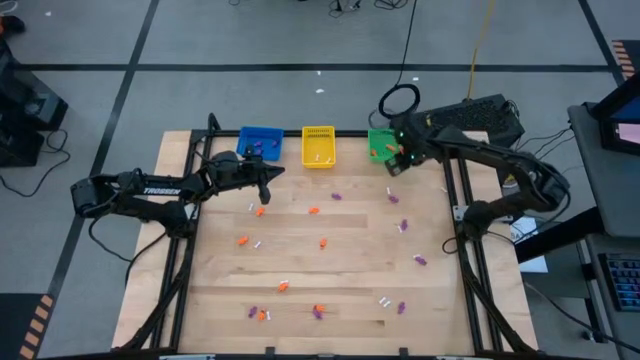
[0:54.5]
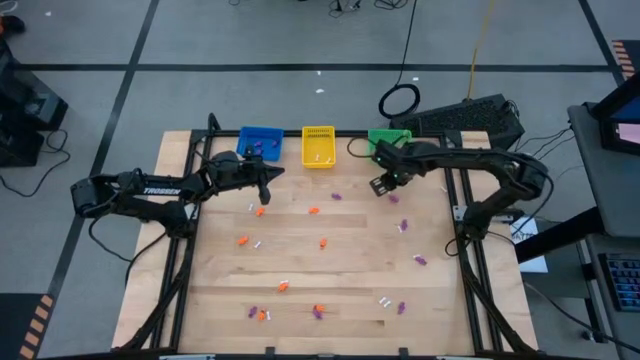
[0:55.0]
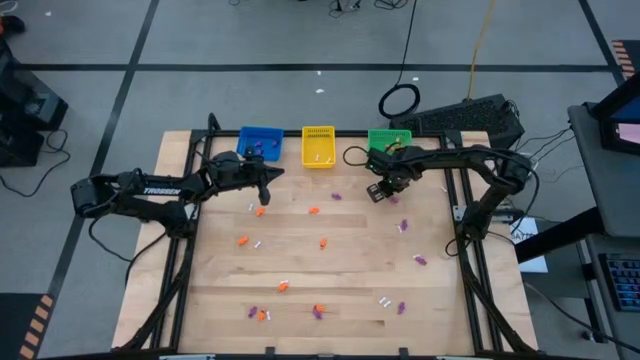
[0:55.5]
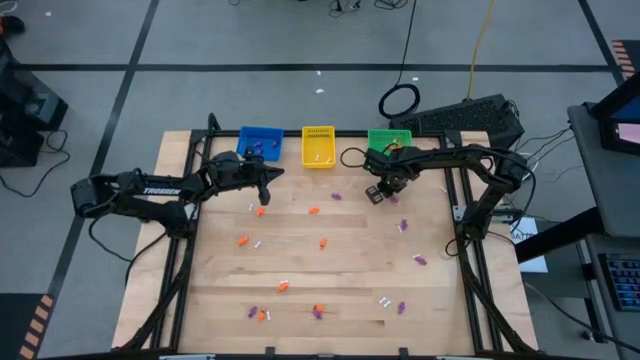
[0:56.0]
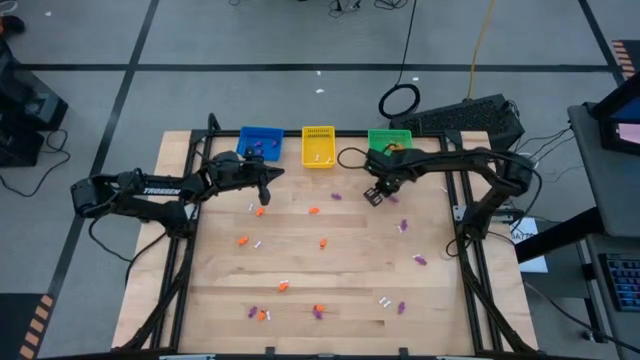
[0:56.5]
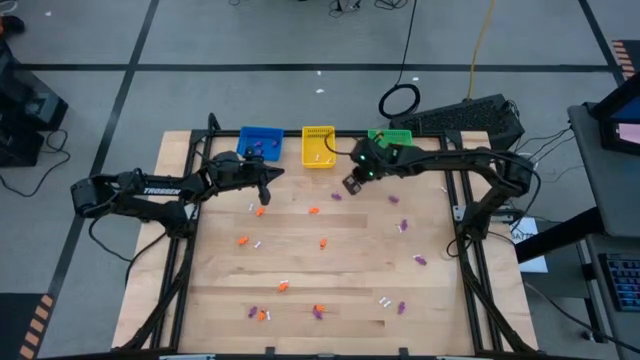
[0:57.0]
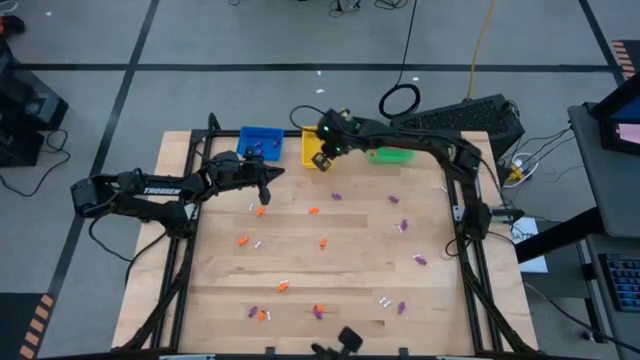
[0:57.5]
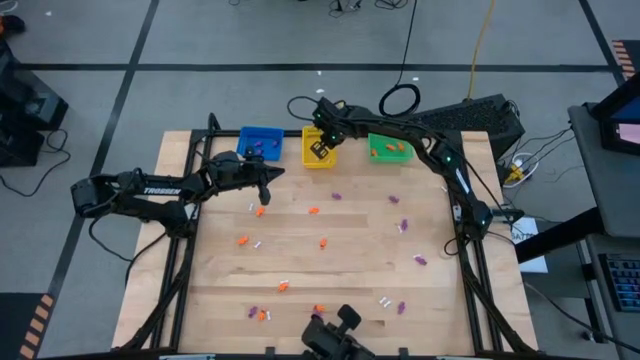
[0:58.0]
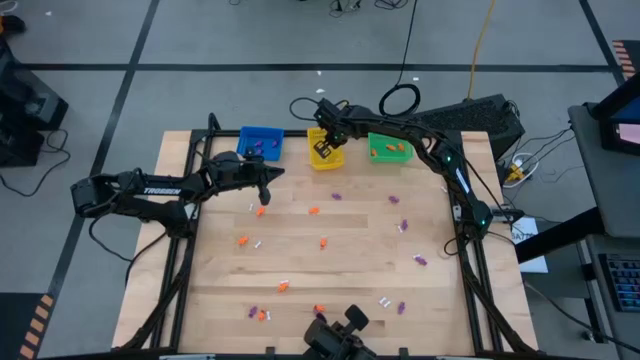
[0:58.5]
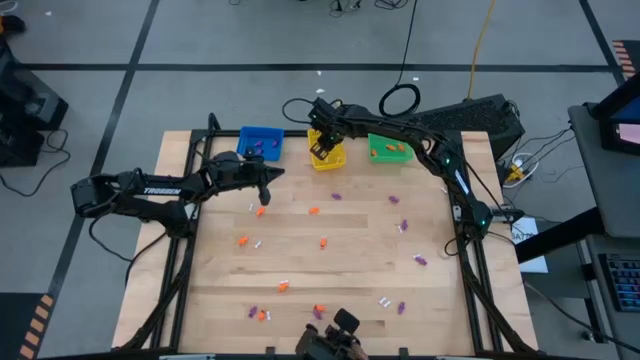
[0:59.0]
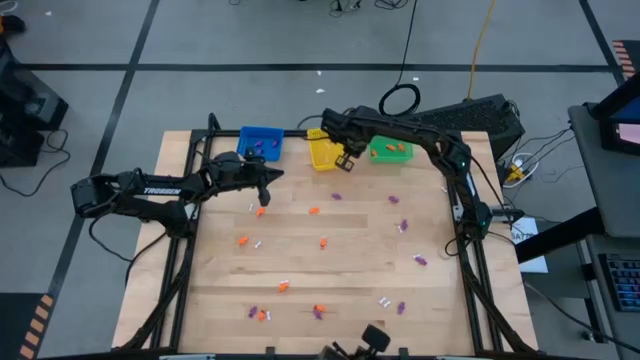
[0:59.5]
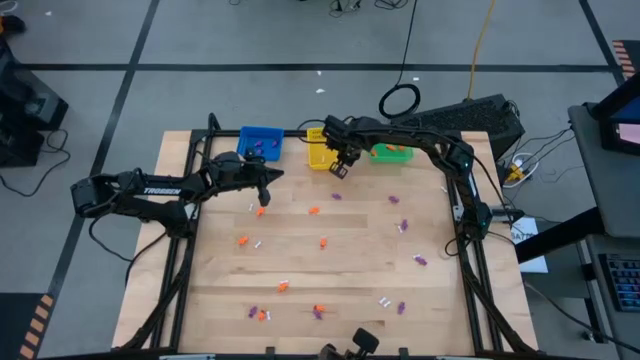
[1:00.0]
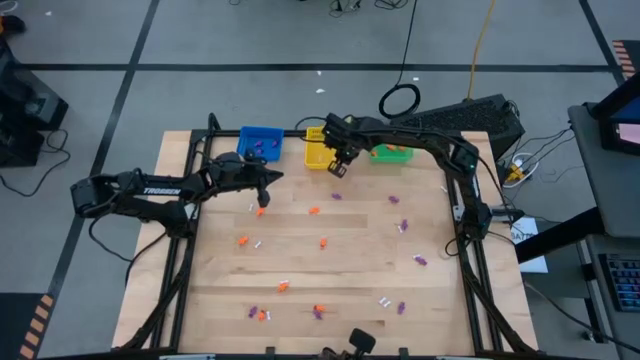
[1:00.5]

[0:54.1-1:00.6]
Task: Sort Halloween decoration
Put the white bone toy into the yellow bin

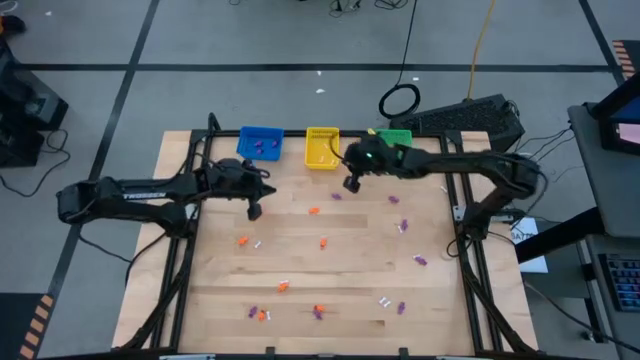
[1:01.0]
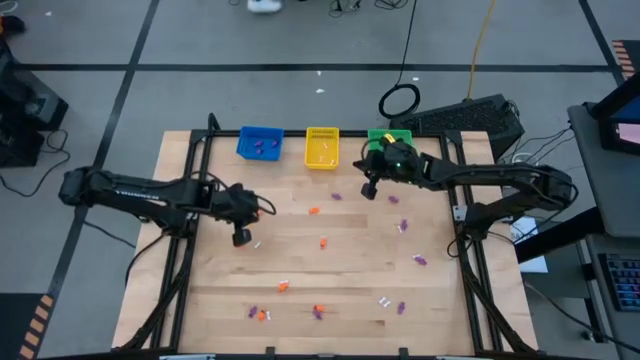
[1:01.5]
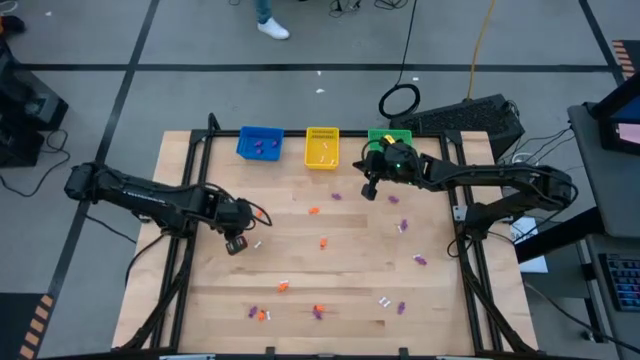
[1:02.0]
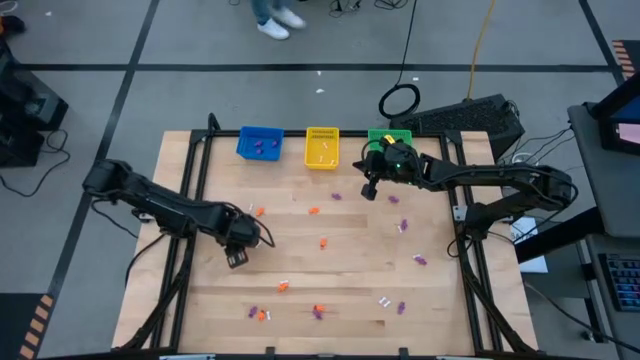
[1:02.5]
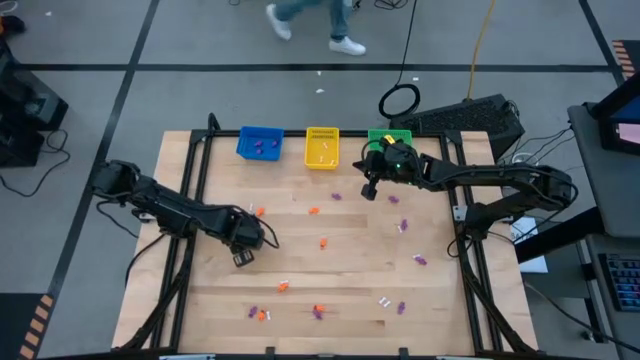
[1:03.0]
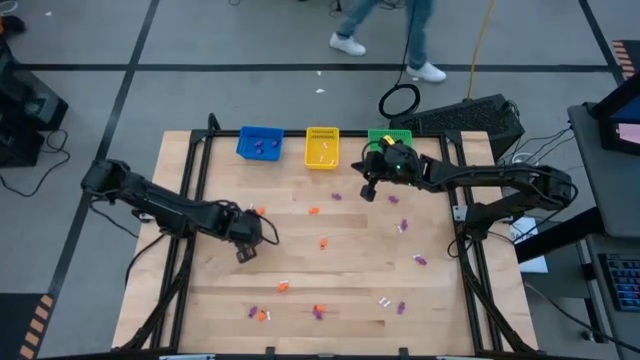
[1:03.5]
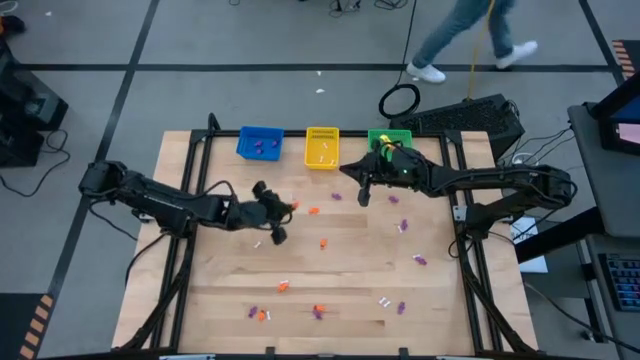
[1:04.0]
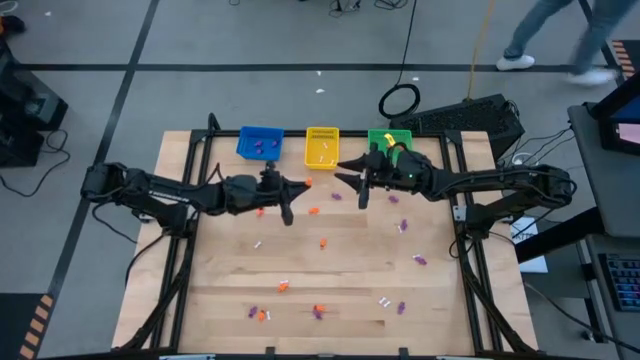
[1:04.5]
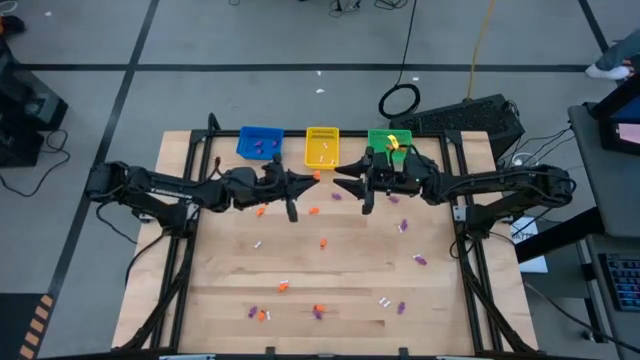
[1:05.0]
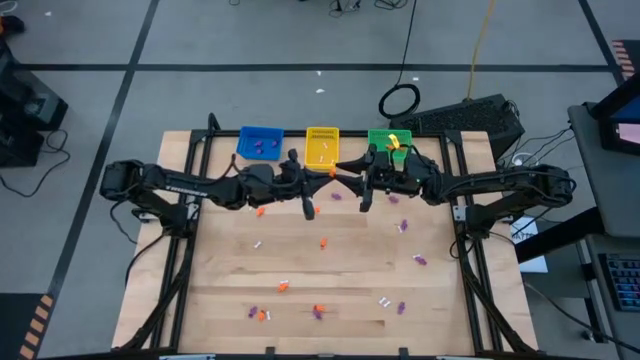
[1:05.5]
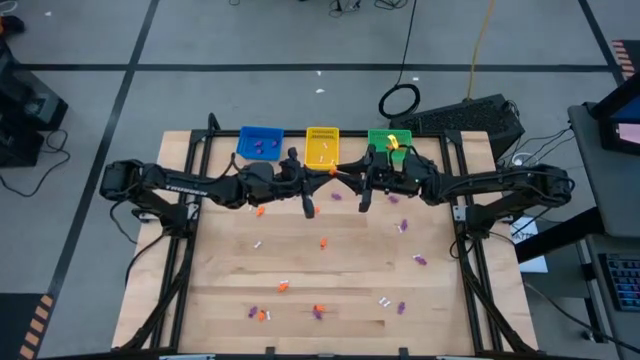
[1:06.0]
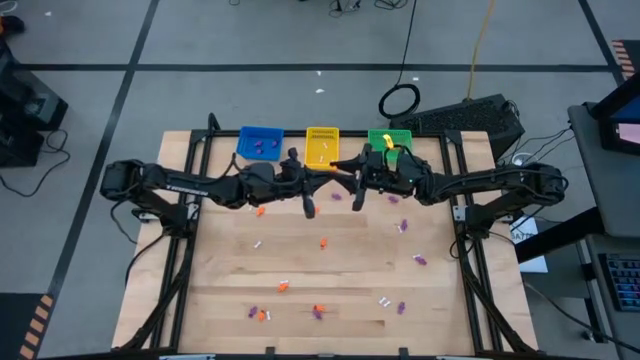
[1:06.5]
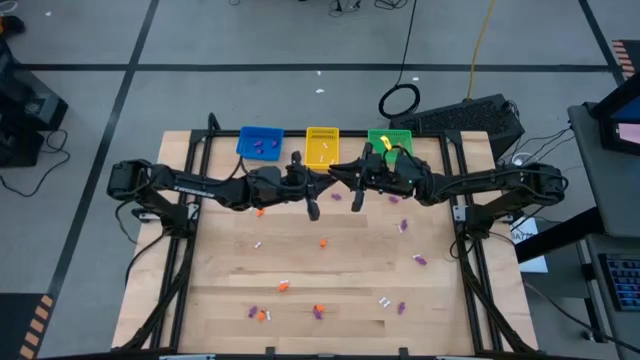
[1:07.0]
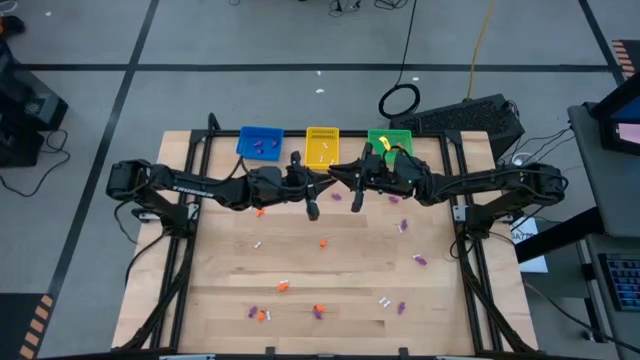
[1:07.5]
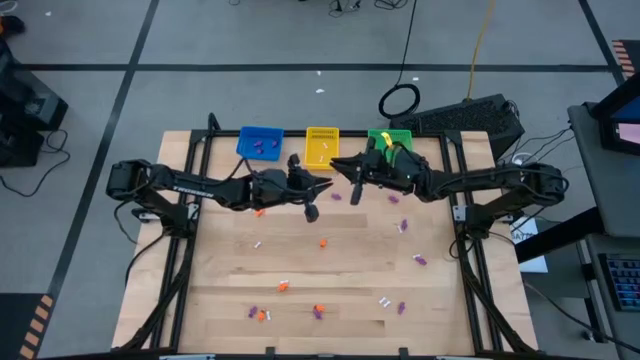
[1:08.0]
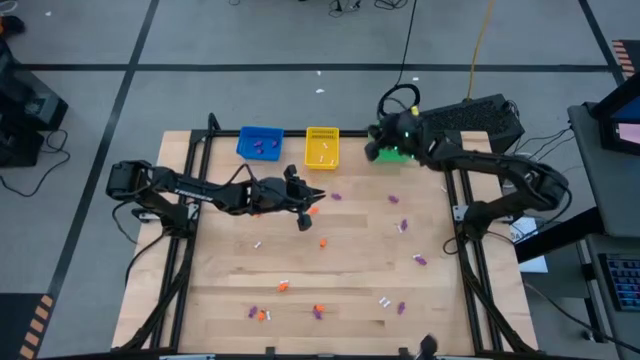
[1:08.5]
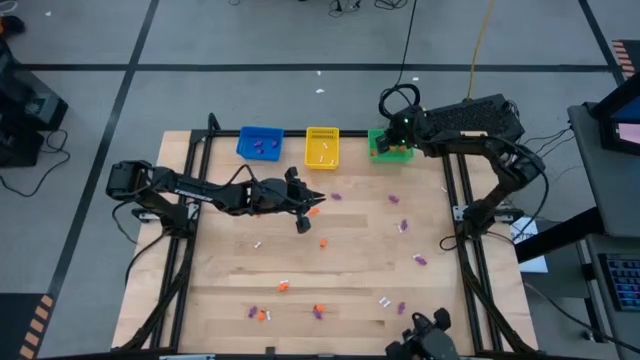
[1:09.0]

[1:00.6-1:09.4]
Put the orange skeleton toy into the green bin

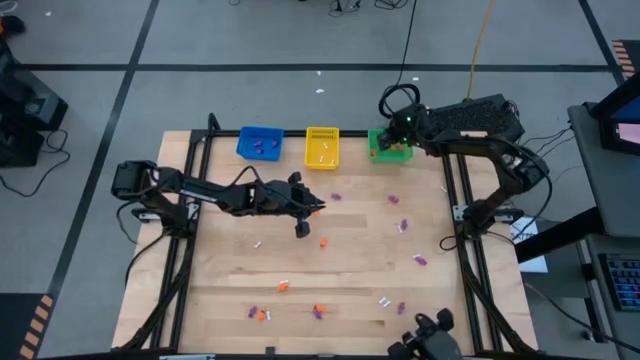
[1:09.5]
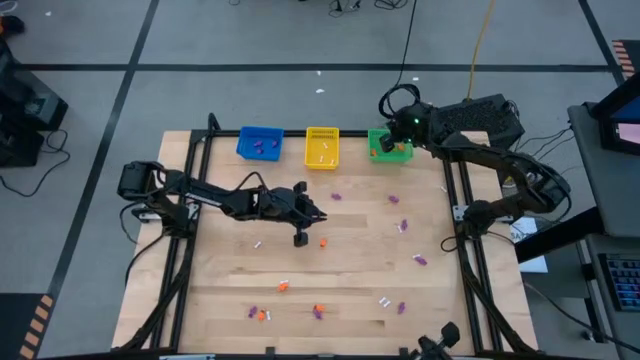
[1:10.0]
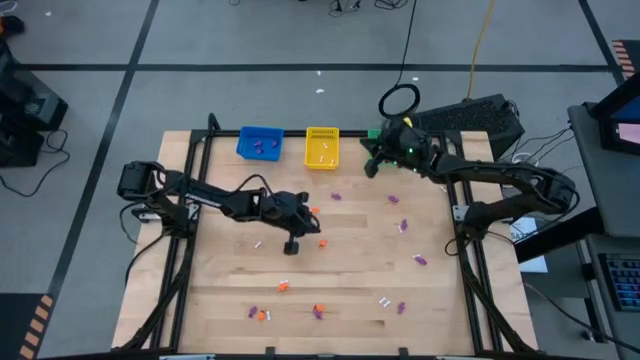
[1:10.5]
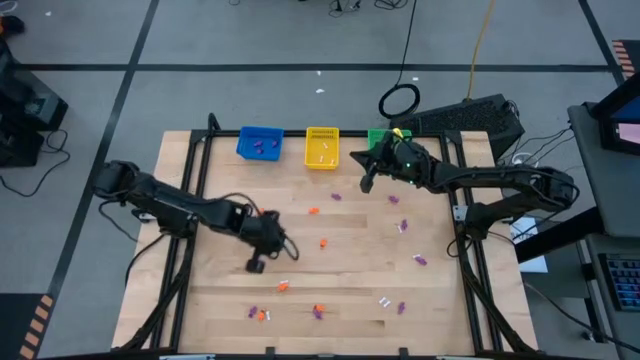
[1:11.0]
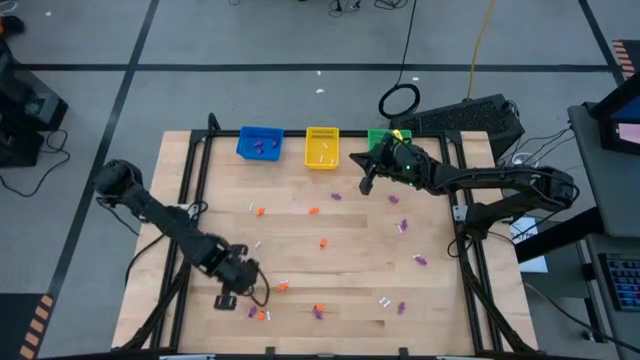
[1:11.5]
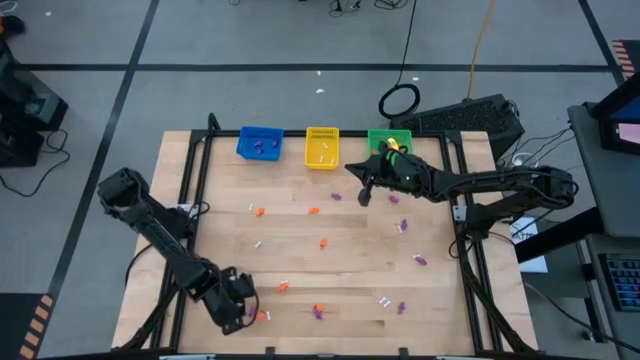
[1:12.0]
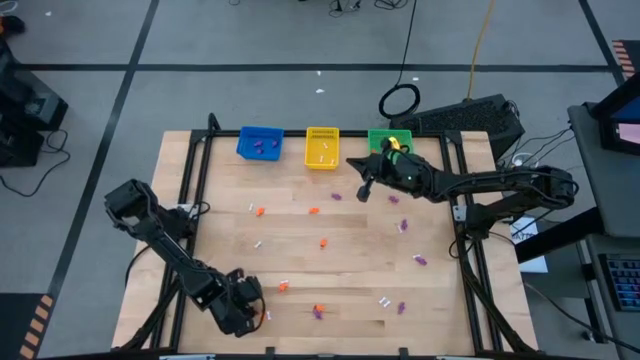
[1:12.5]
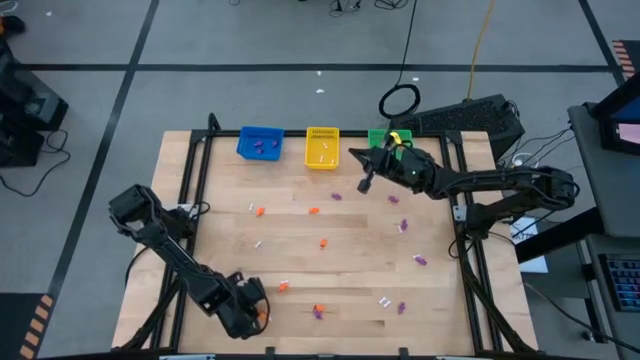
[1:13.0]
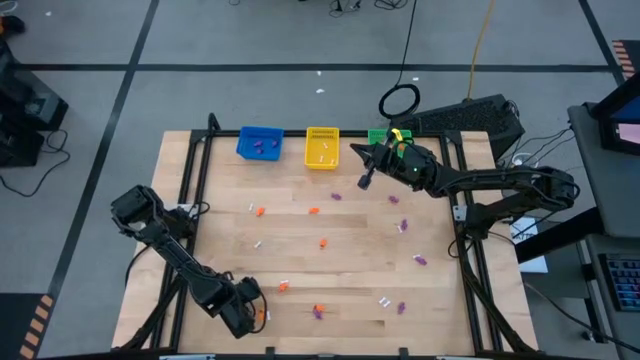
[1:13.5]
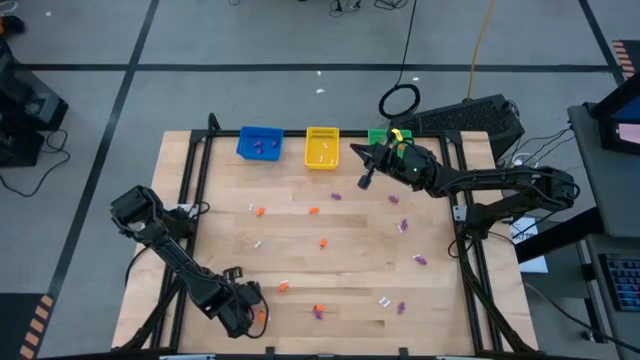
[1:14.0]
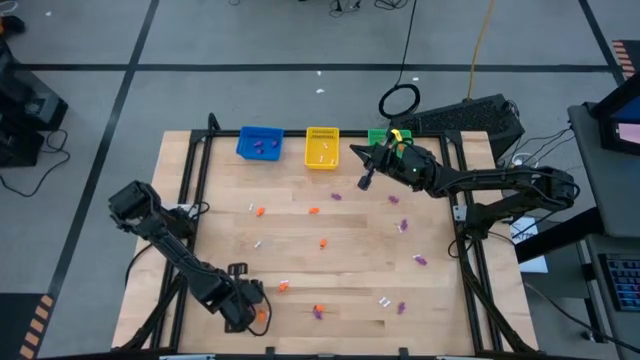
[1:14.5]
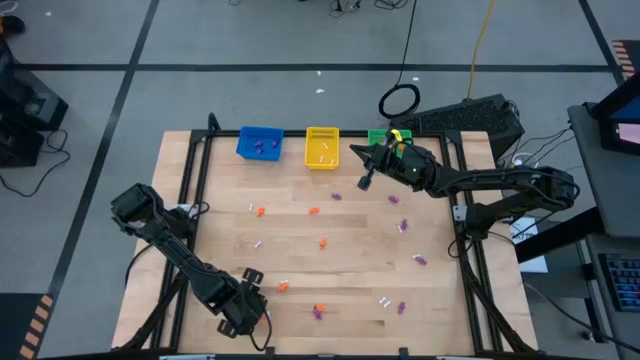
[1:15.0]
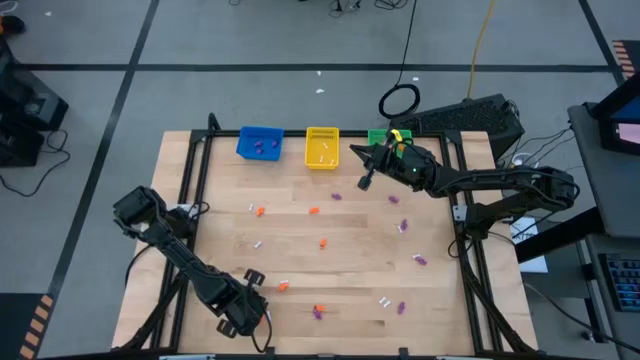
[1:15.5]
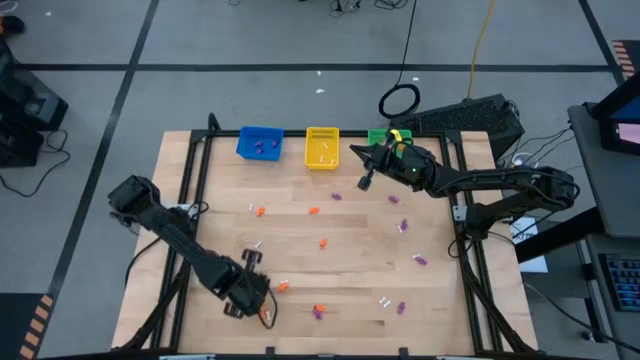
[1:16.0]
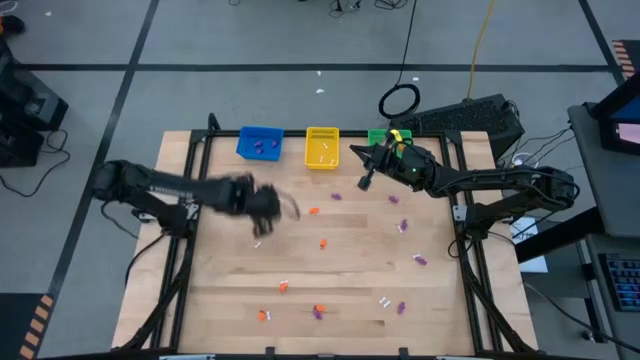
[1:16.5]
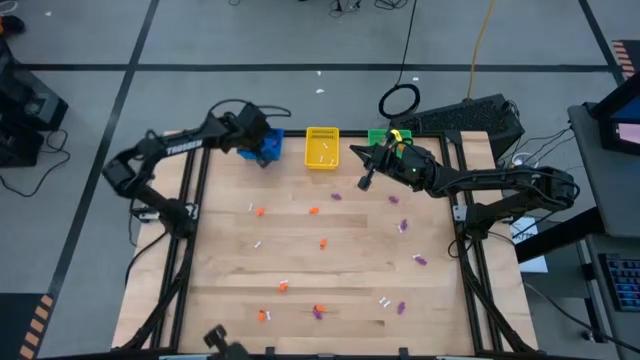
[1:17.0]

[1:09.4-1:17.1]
Put the violet skeleton toy into the blue bin
